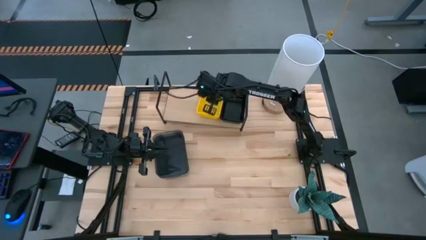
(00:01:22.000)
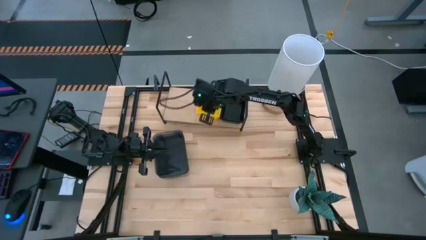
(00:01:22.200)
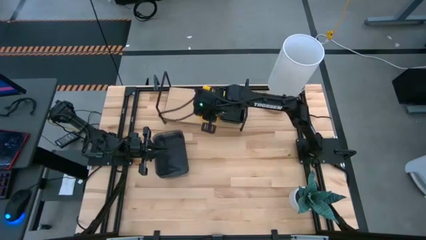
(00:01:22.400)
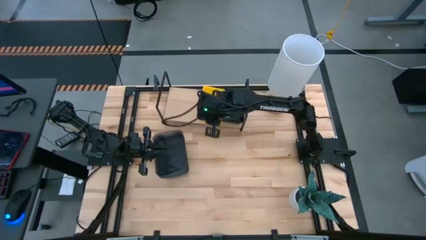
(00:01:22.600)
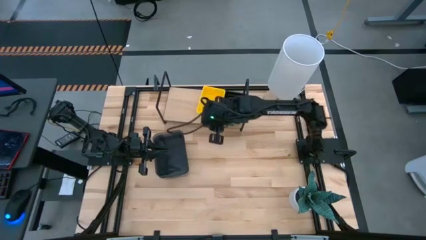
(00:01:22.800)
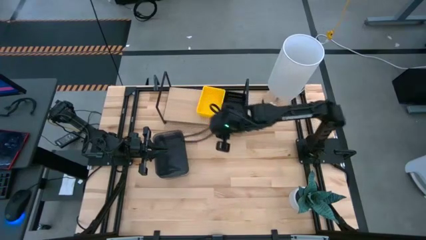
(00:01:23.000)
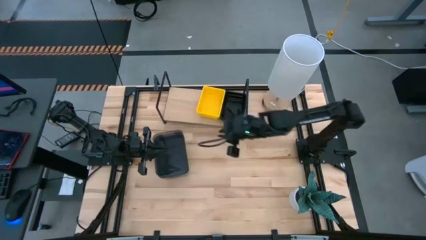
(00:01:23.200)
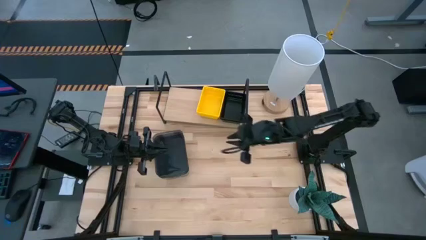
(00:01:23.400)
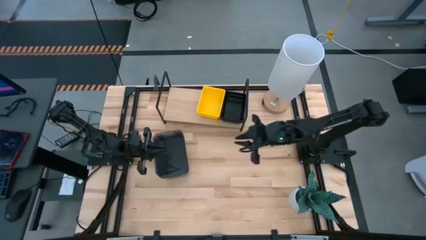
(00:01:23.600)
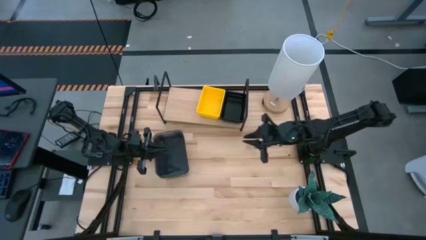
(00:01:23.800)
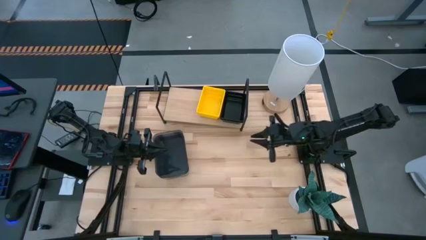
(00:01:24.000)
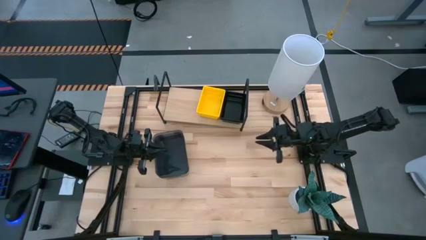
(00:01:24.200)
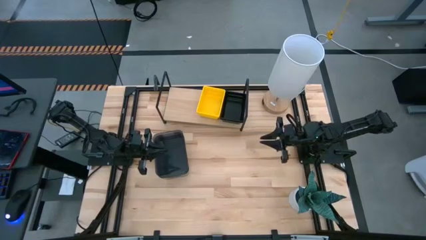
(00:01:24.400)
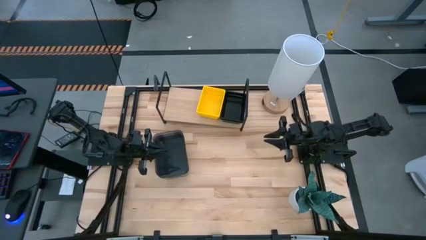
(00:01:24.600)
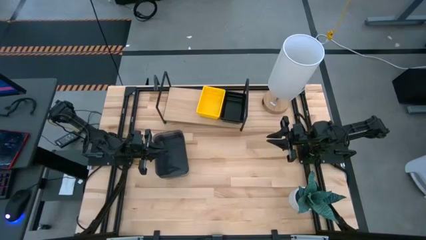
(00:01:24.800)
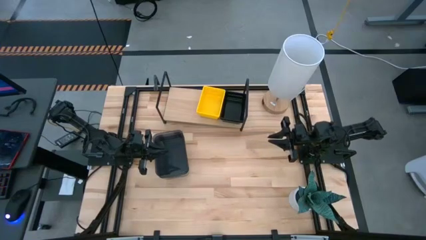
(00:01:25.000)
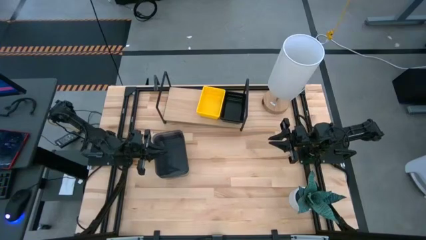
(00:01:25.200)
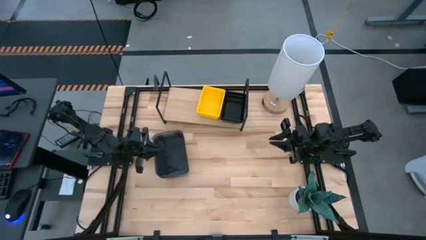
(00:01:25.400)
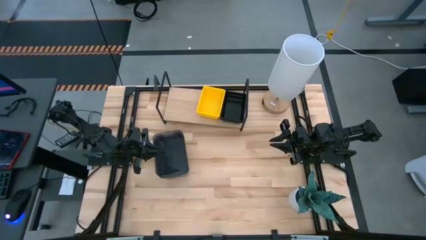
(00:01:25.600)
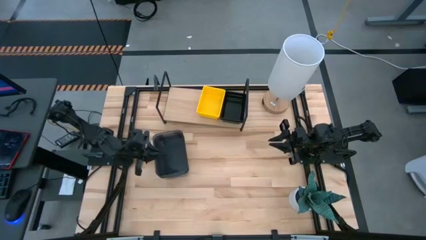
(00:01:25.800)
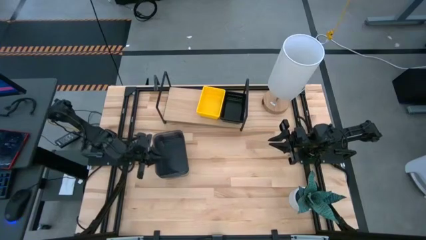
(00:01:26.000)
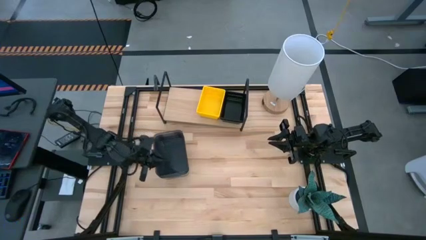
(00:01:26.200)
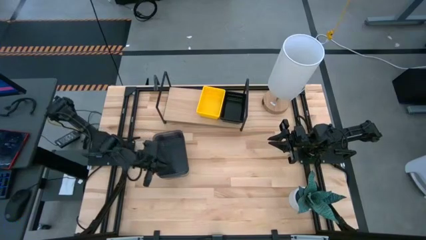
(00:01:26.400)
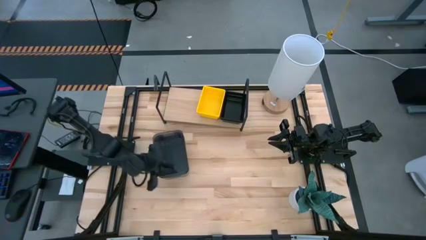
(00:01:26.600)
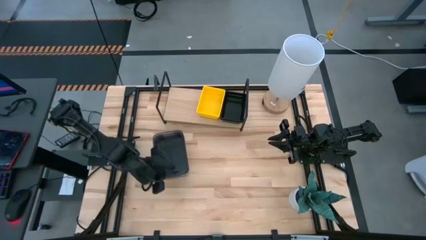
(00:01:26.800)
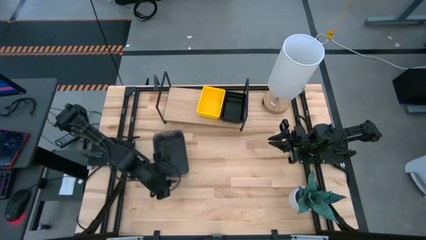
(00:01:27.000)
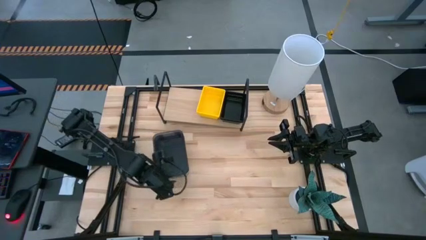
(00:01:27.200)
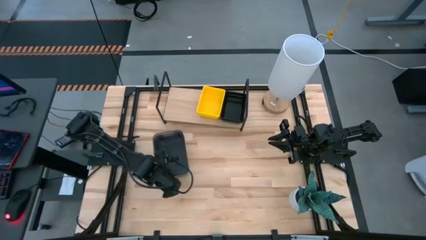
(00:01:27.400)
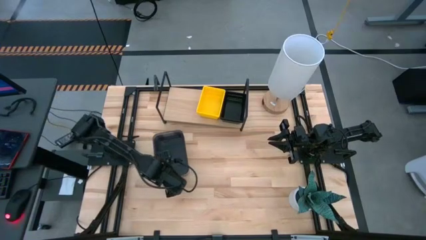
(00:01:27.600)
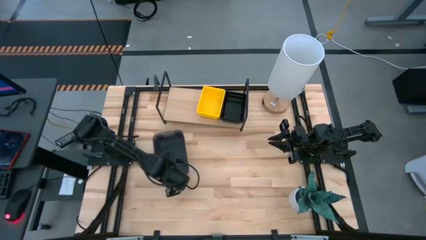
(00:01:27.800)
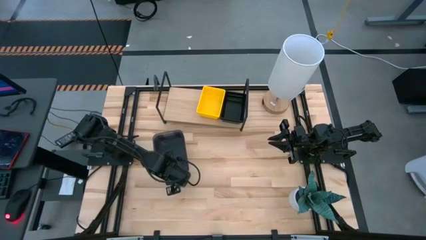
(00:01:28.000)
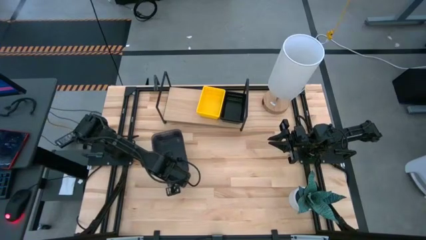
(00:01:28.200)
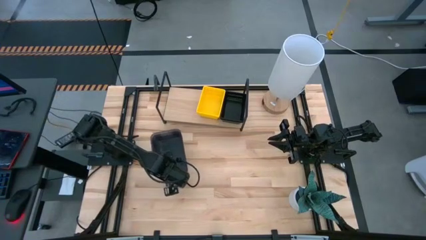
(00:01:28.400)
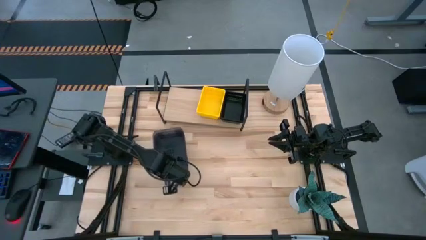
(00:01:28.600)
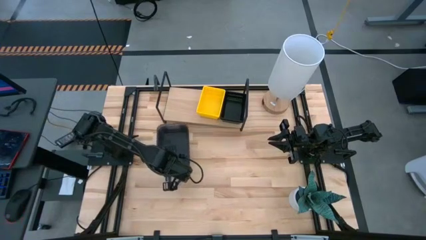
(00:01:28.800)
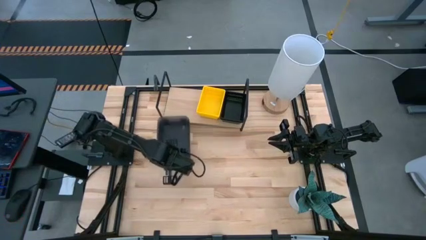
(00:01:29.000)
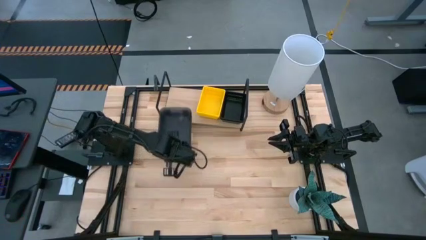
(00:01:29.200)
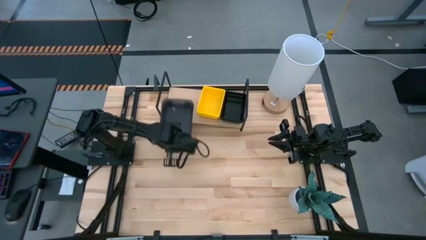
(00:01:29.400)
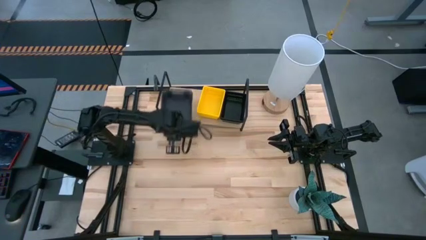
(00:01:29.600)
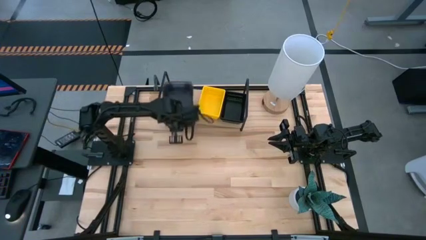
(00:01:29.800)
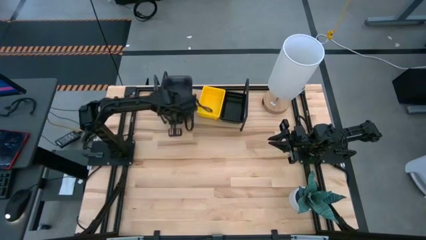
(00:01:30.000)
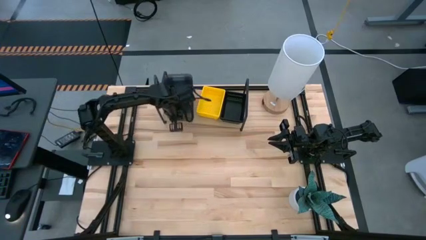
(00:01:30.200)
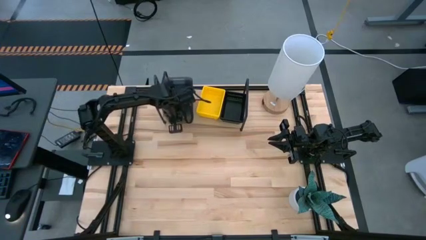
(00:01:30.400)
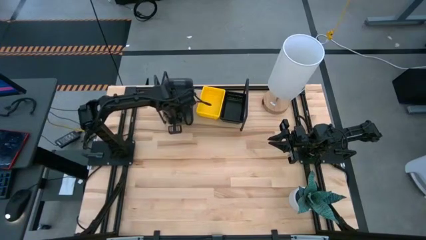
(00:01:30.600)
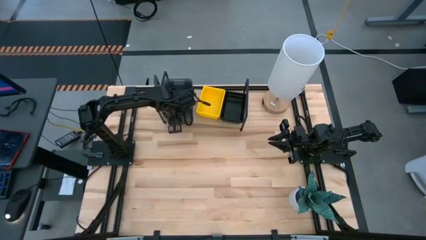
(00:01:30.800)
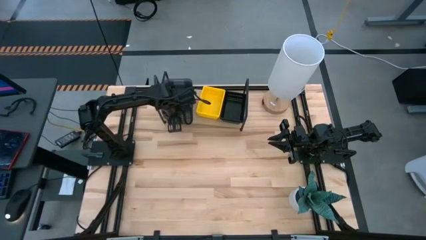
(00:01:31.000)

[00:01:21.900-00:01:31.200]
Task: Stack baskets on shelf by color
Put the stacked black bins on the shelf

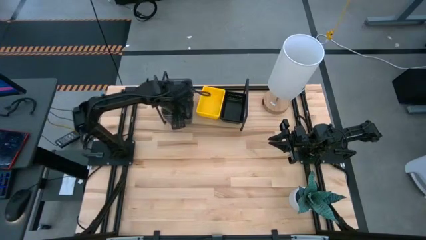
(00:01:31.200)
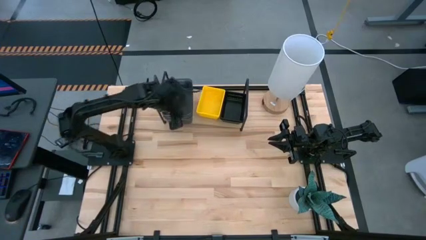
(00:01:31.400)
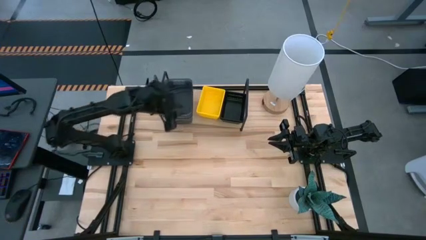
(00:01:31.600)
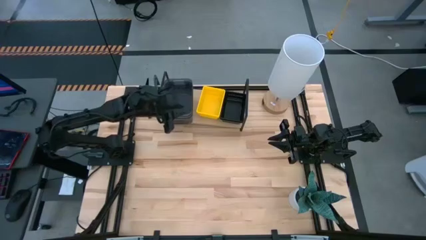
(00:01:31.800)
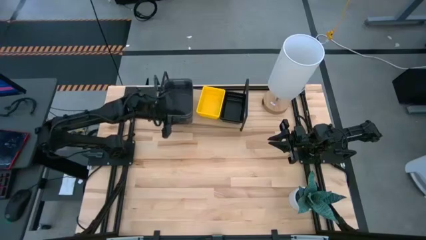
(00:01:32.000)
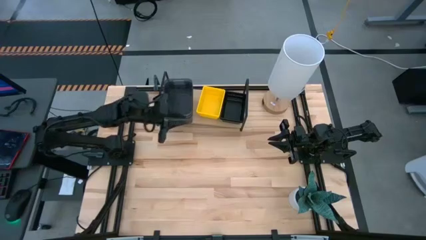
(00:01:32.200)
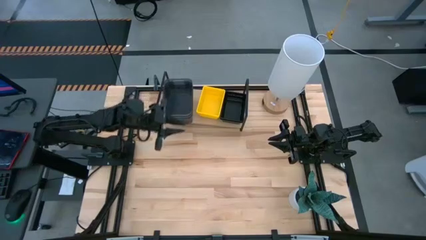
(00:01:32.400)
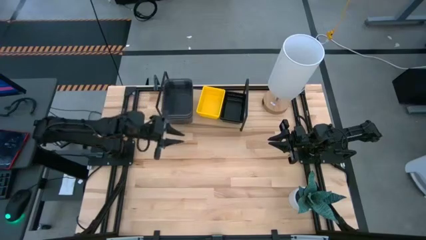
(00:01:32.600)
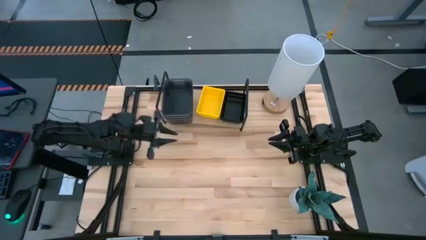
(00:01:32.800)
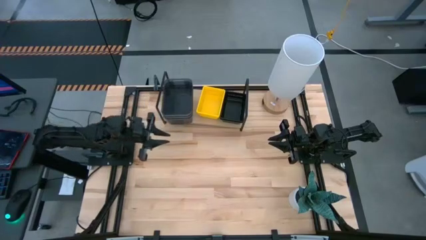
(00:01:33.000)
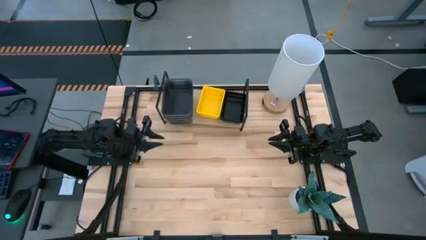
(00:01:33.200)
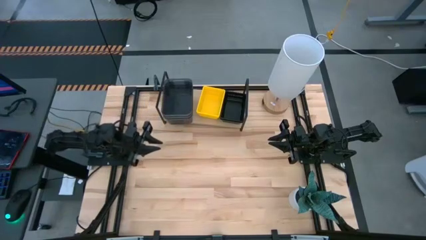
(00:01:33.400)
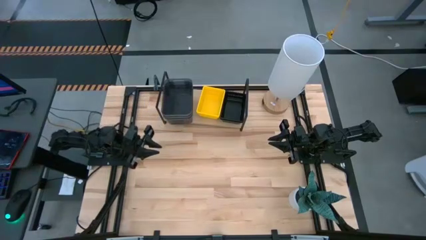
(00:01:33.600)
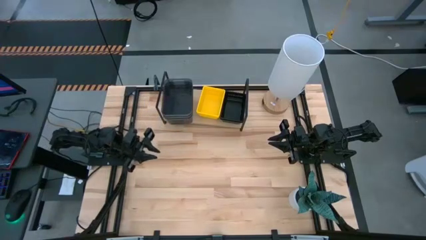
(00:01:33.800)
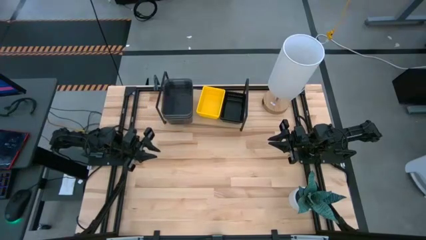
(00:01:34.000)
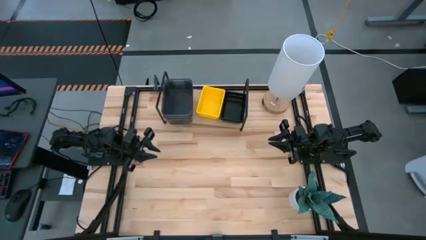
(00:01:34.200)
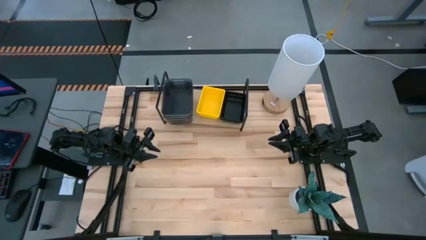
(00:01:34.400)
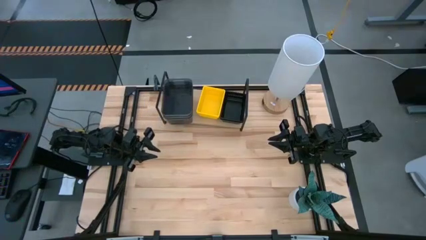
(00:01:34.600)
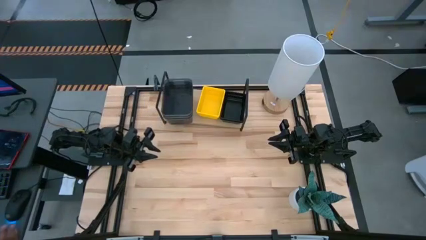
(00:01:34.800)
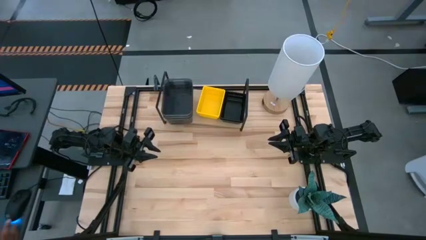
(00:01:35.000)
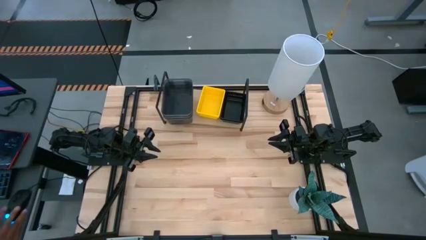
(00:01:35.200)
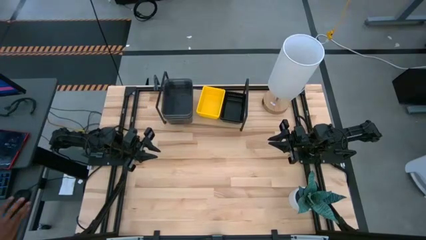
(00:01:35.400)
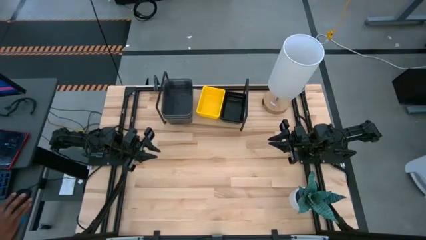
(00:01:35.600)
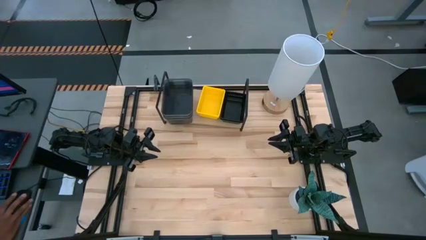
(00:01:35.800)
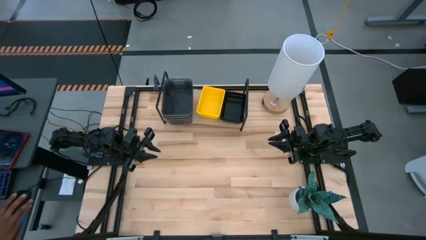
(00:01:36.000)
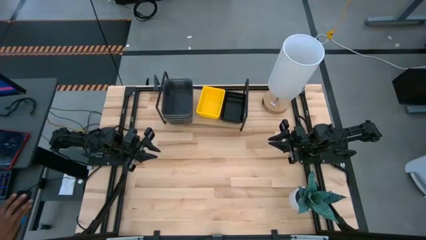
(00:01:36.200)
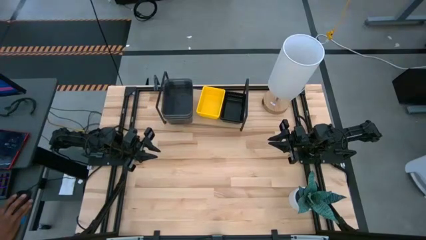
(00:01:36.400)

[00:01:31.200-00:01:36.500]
Return to Home Position
